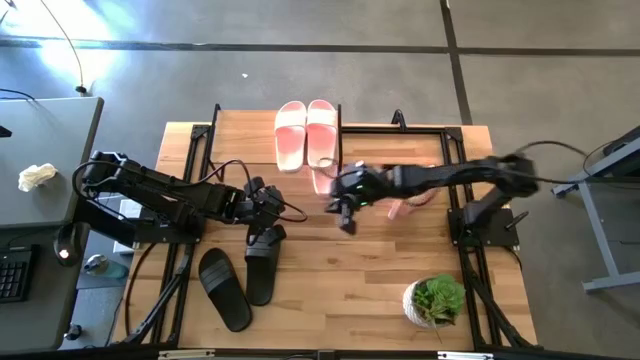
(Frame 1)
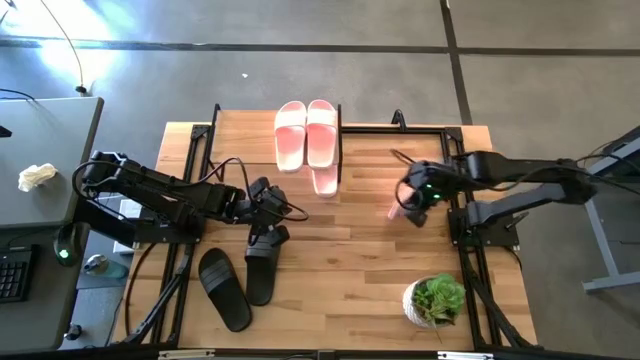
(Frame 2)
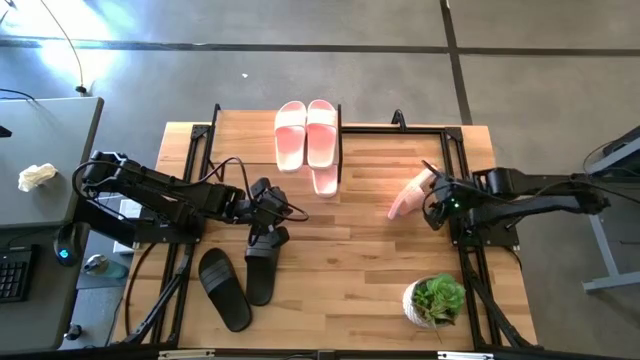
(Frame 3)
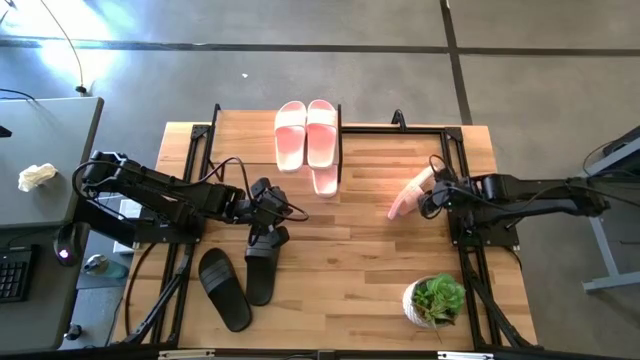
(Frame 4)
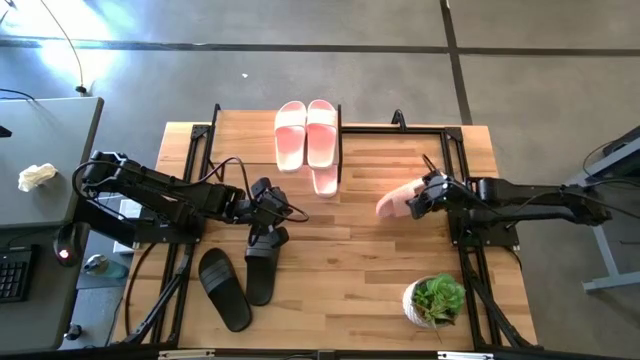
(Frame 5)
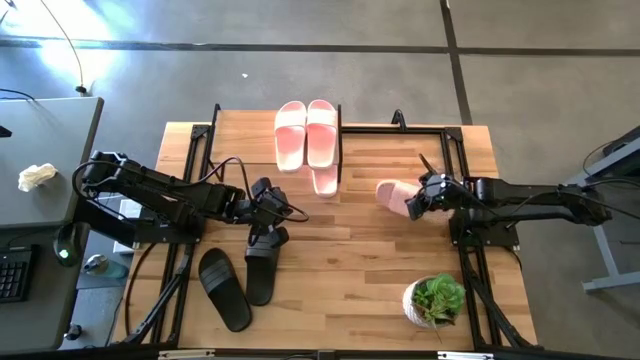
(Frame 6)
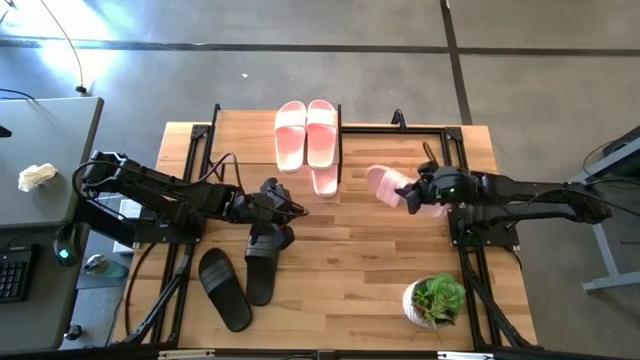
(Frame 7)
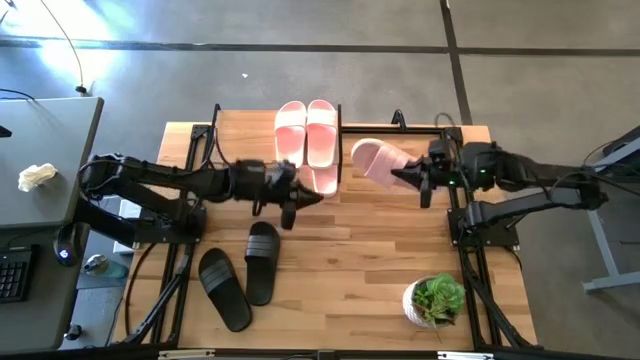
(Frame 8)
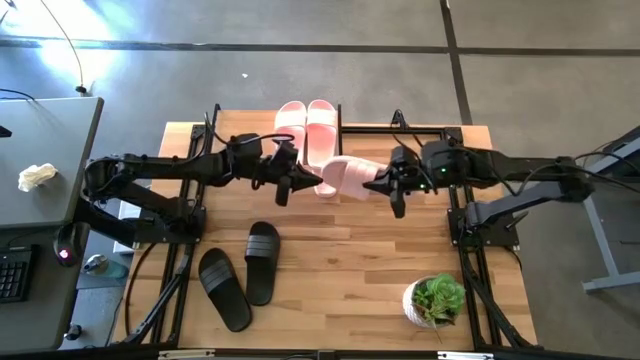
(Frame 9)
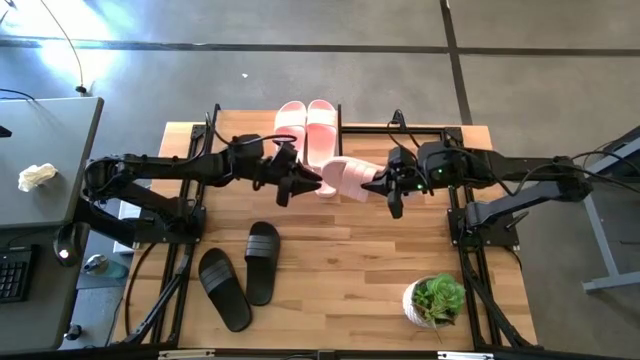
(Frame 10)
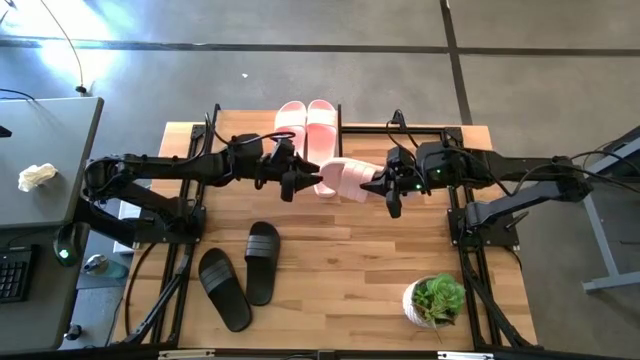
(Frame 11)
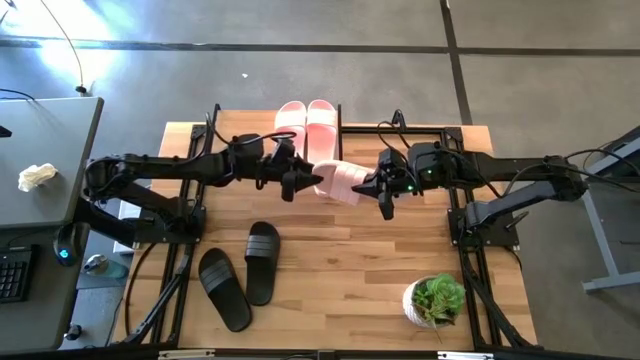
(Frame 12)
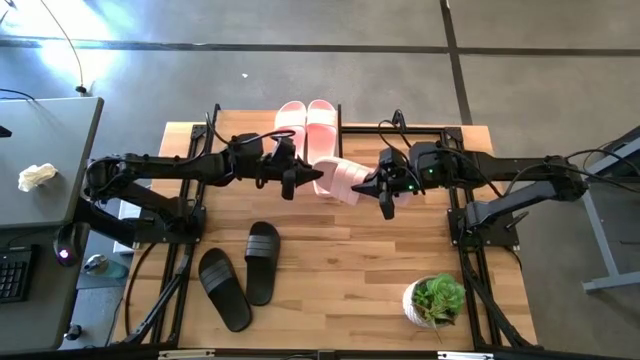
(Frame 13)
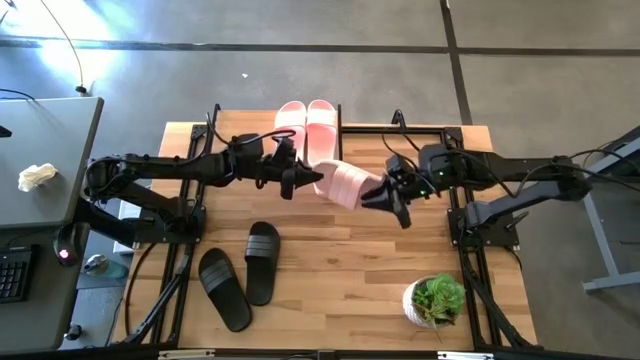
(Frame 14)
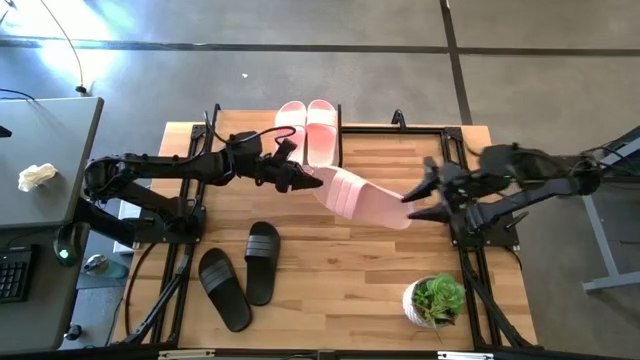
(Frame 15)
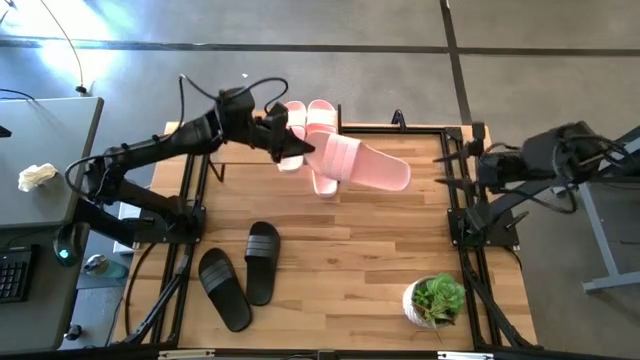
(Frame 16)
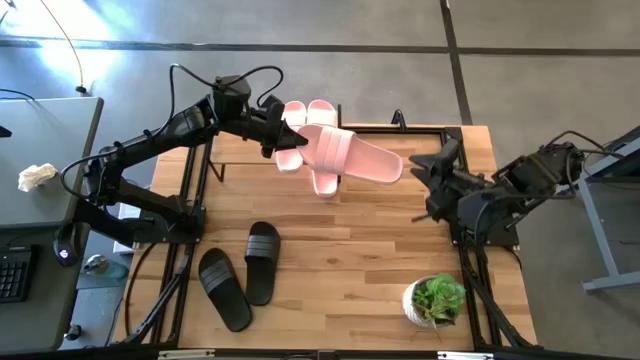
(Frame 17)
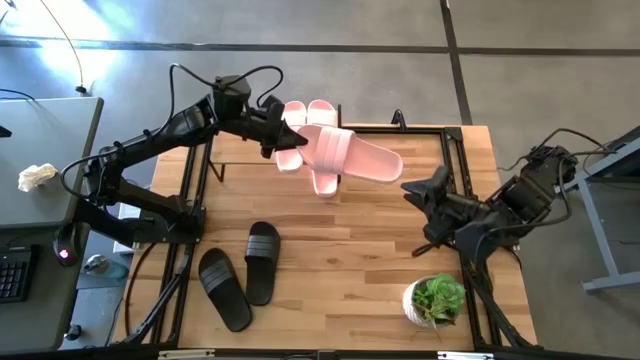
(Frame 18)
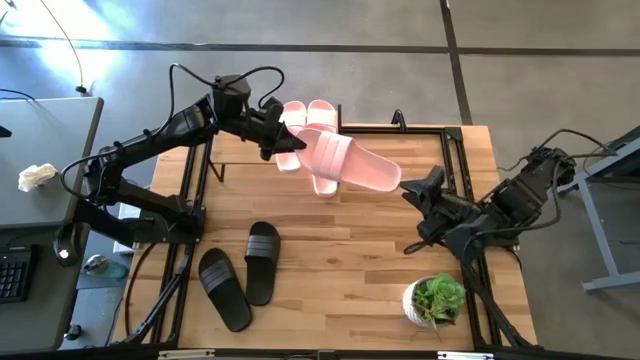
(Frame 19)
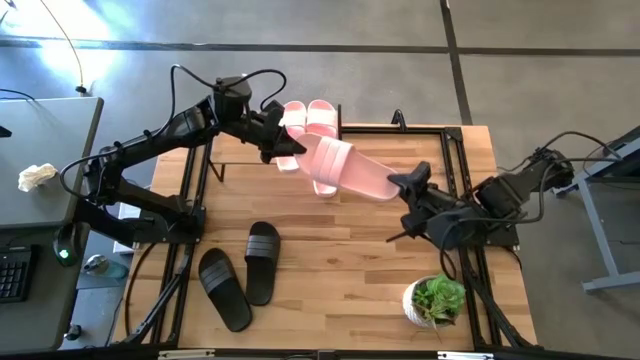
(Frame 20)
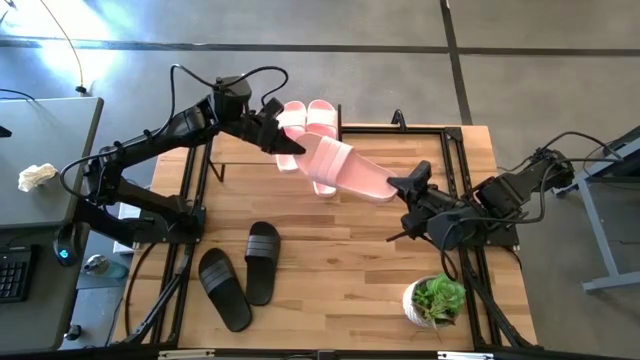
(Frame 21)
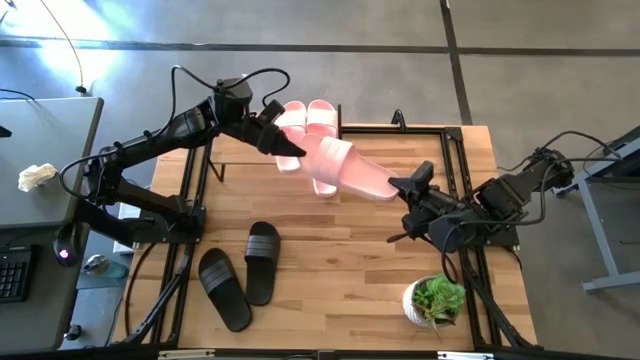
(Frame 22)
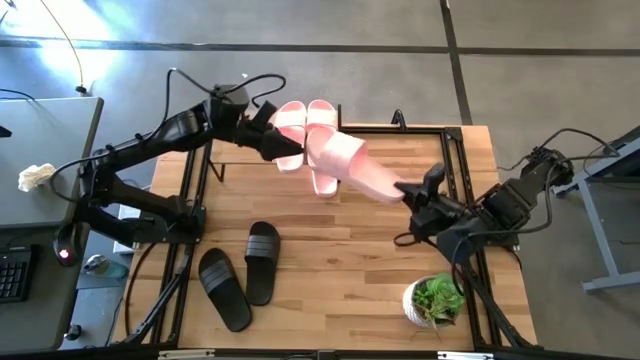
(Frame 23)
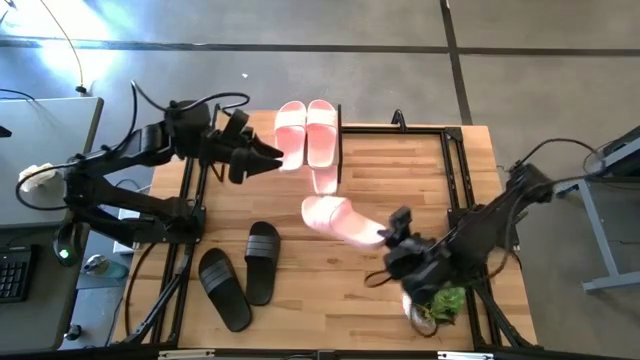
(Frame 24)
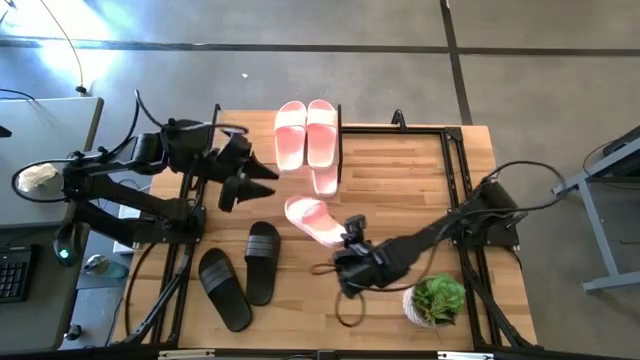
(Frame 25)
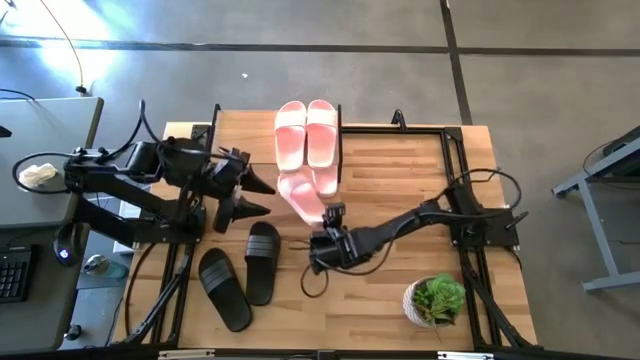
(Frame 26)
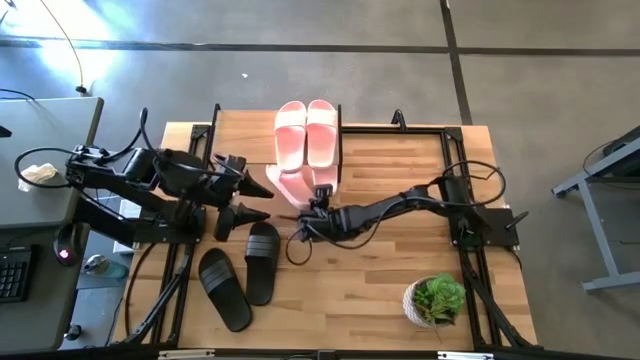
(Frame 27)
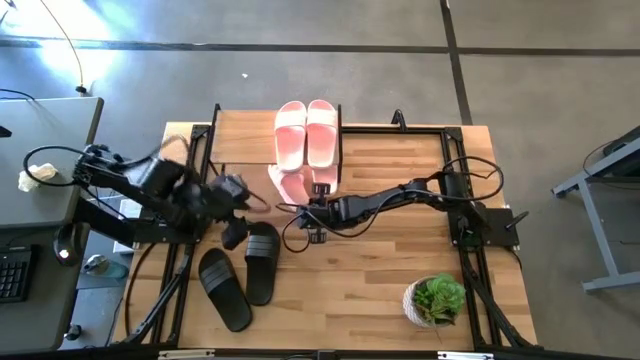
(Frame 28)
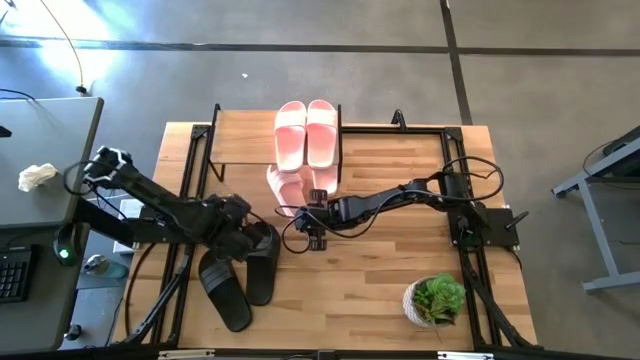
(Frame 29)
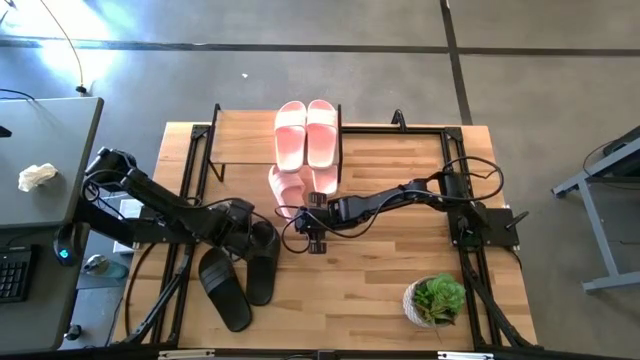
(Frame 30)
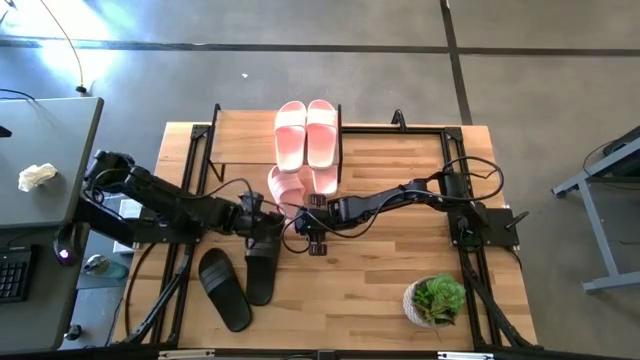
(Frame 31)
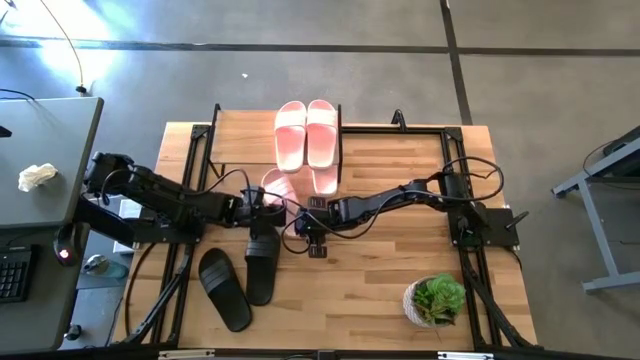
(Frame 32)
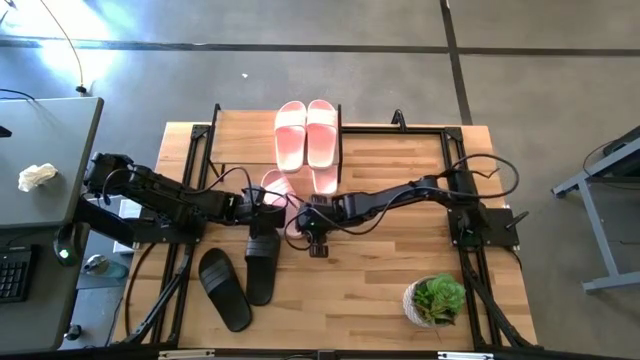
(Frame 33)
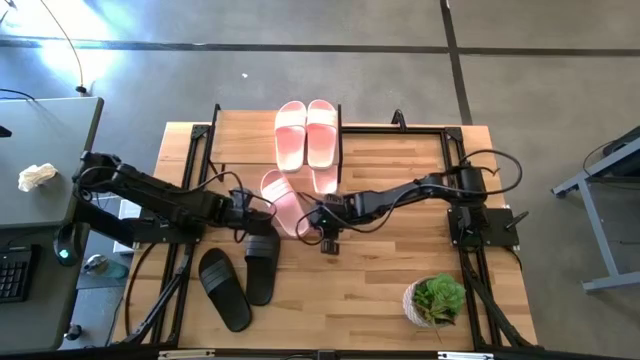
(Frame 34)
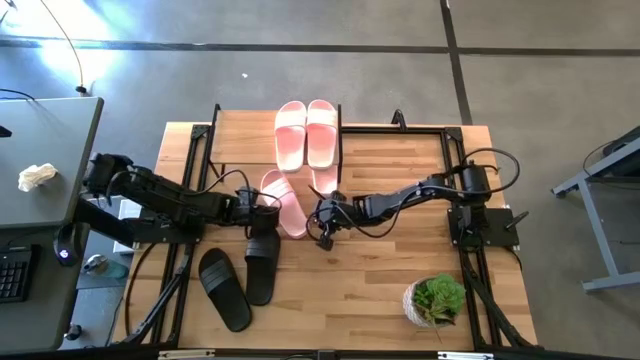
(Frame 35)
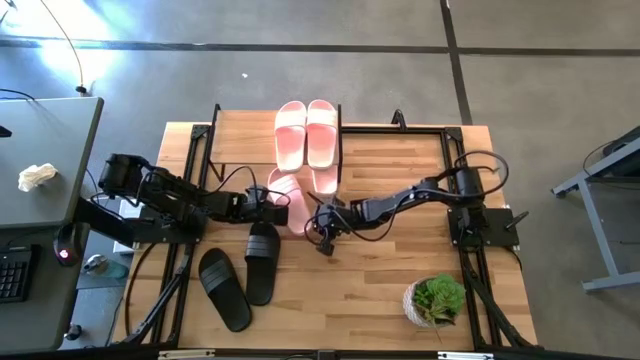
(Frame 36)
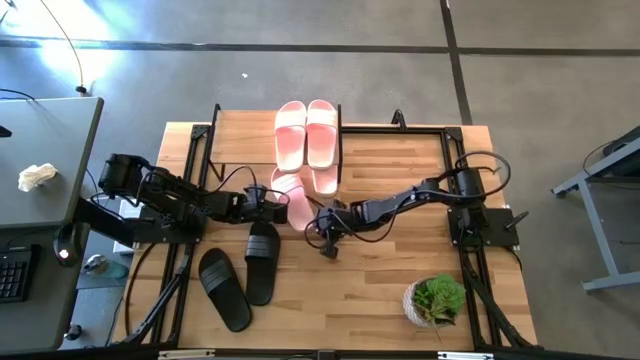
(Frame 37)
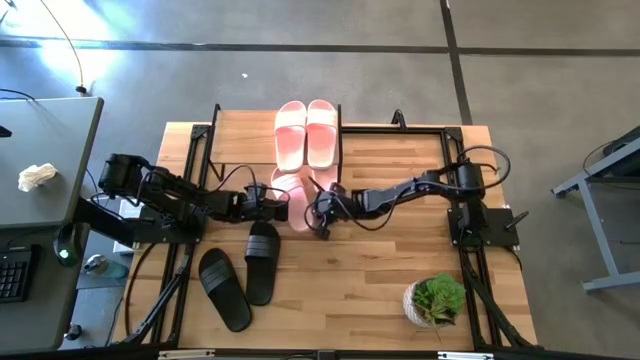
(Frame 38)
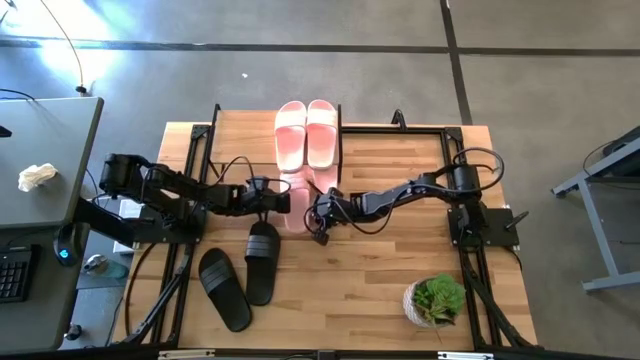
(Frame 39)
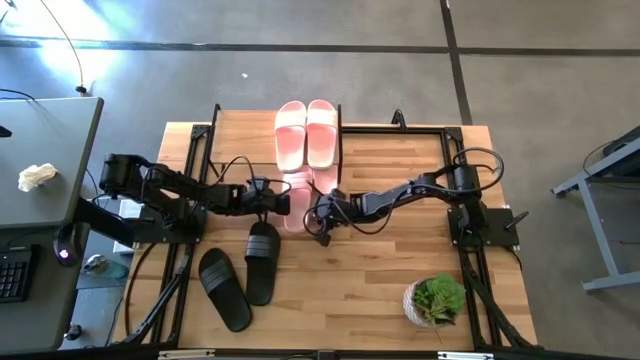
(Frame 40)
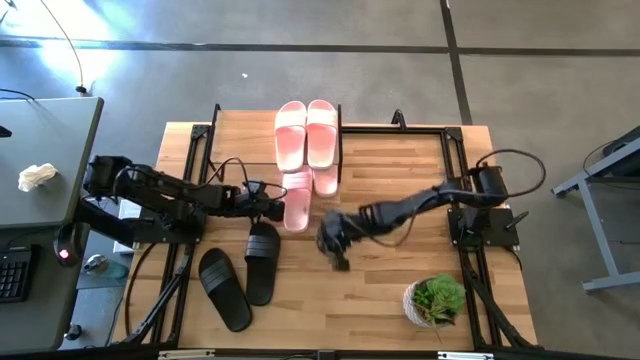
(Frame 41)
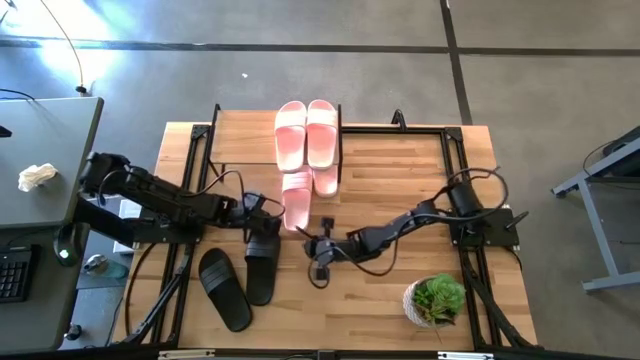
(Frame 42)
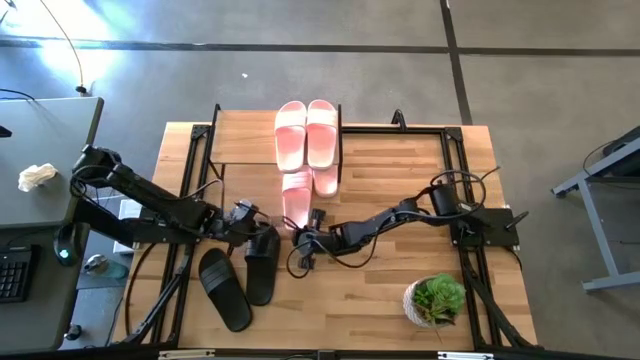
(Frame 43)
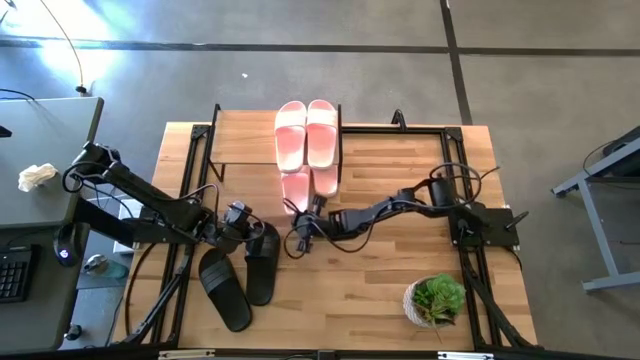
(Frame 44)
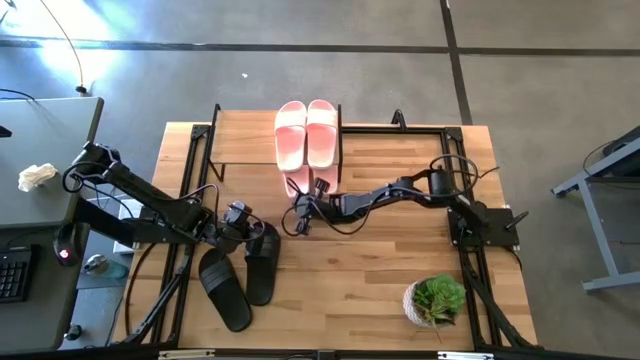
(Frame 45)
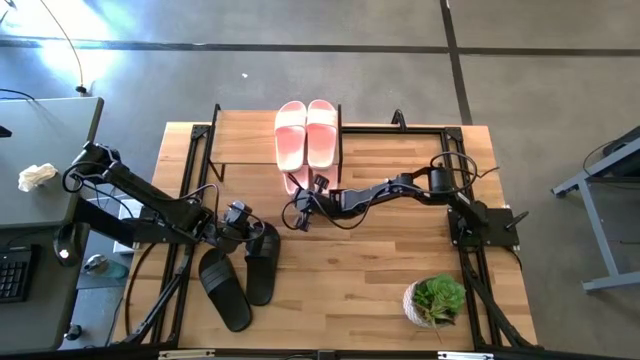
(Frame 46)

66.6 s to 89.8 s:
Task: Pick and place slides into the shelf
Put the pink slide under the shelf
